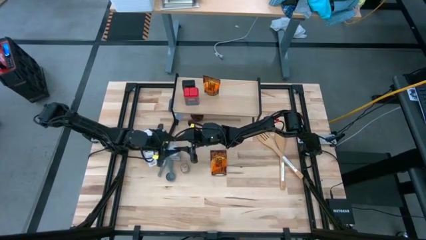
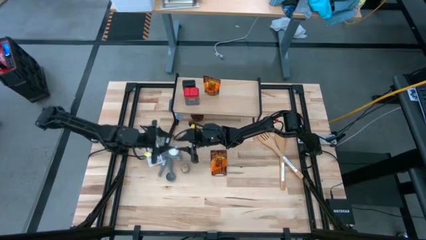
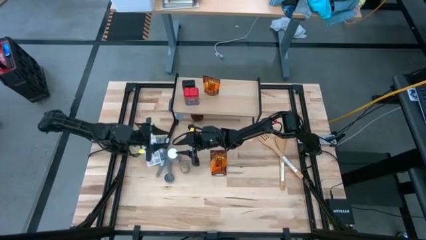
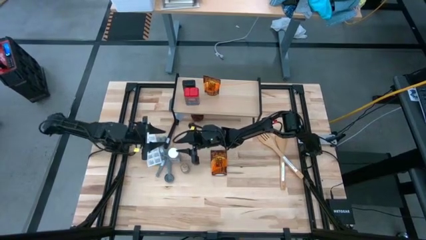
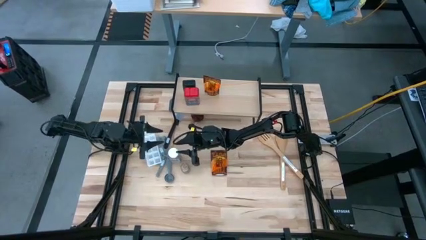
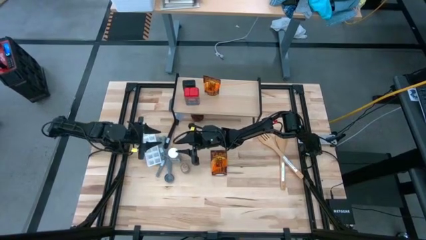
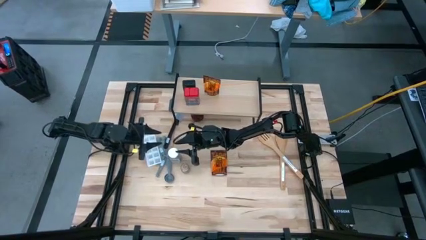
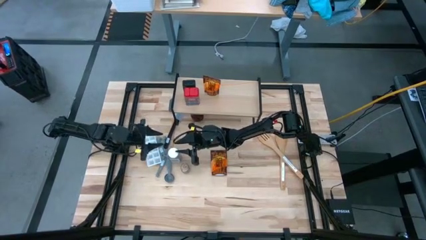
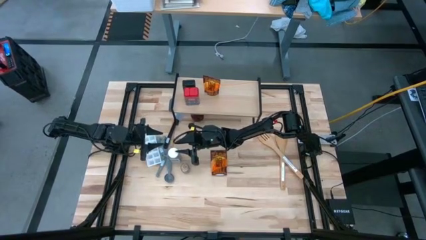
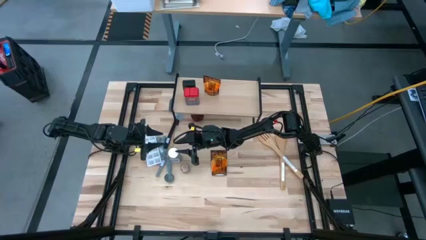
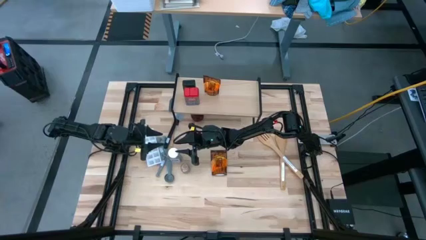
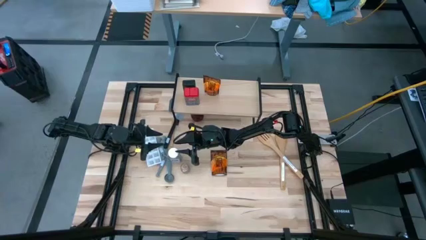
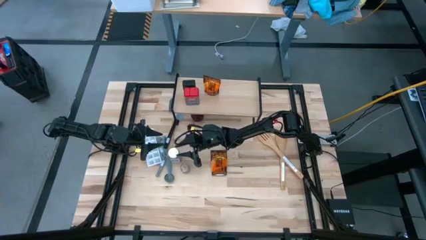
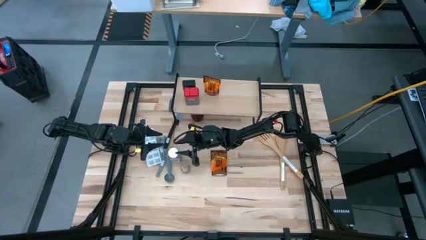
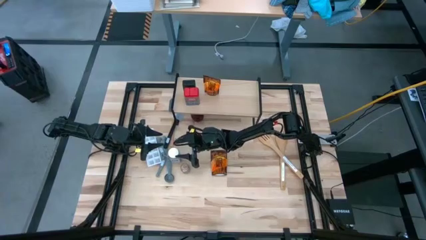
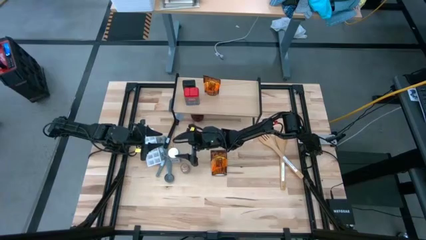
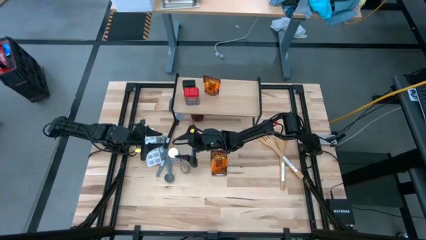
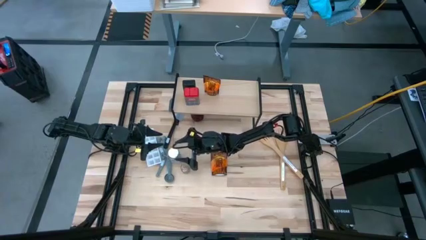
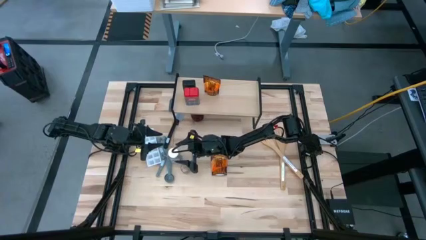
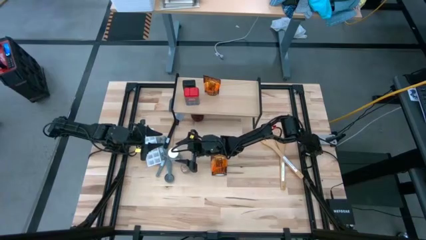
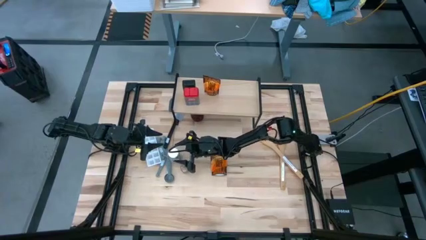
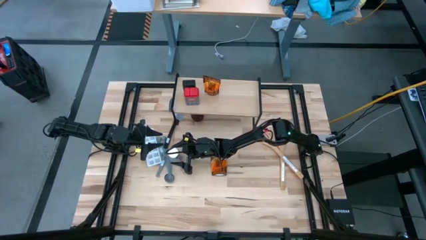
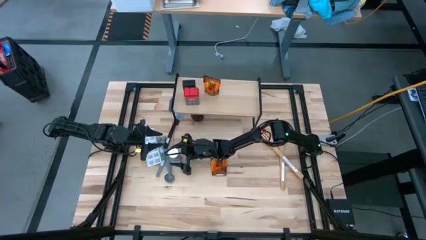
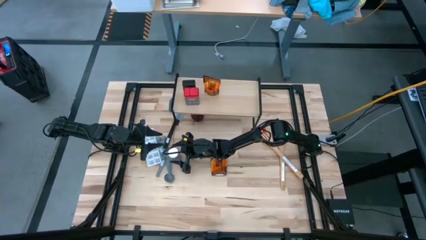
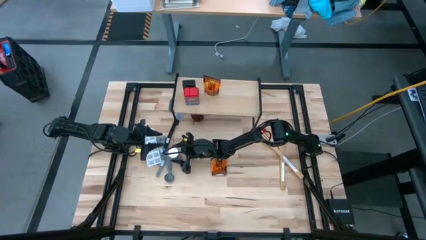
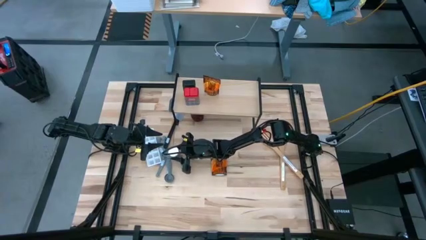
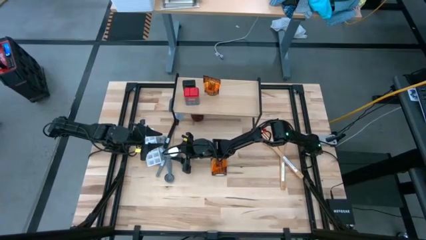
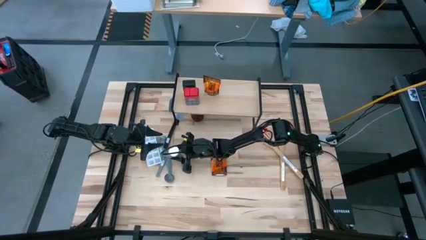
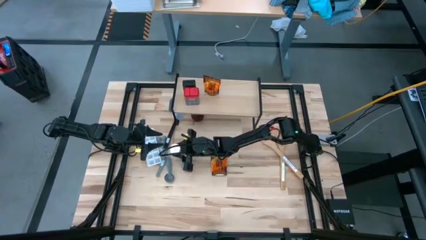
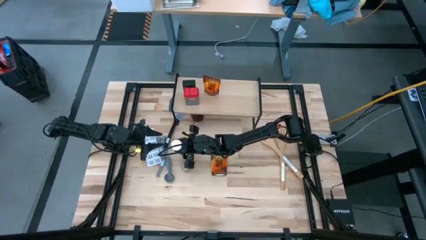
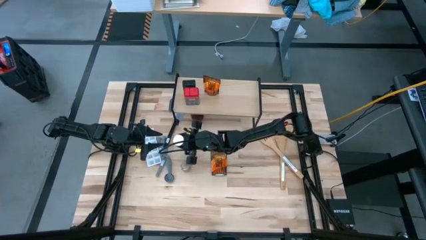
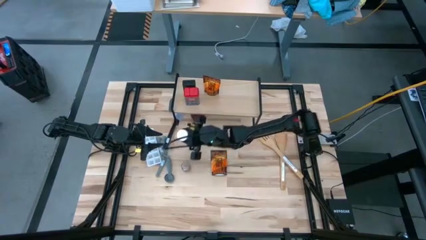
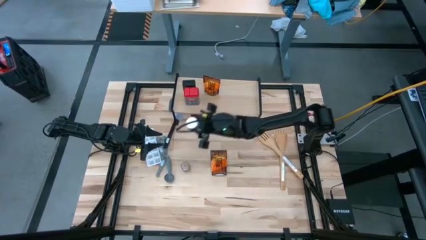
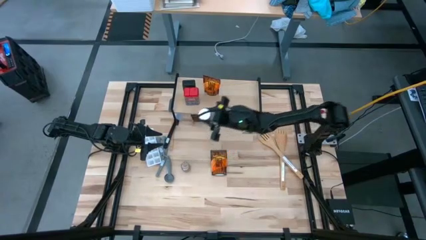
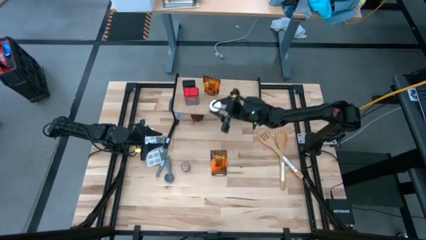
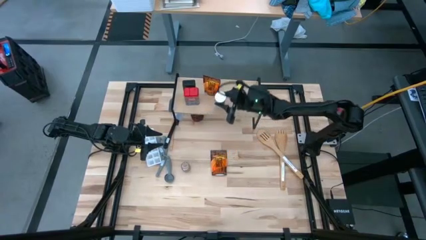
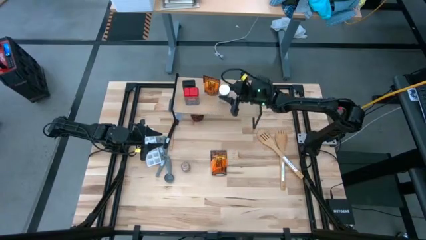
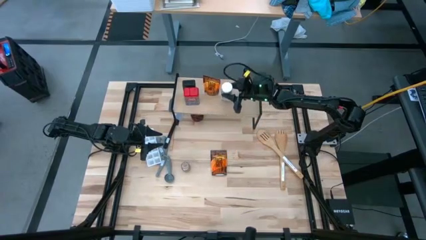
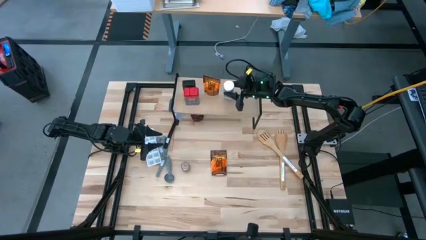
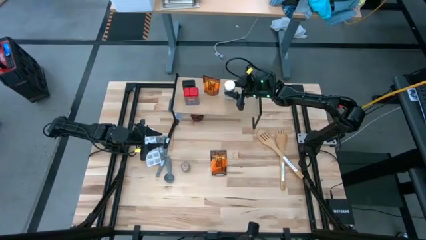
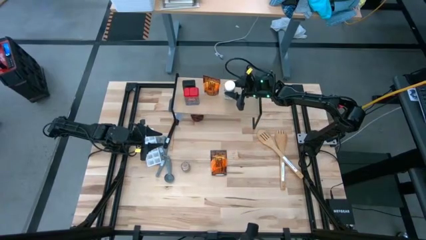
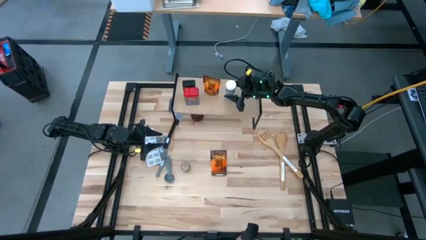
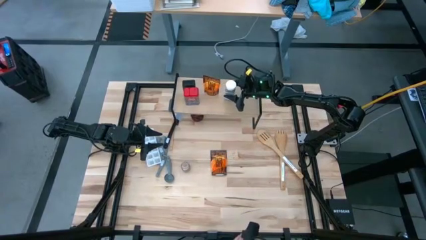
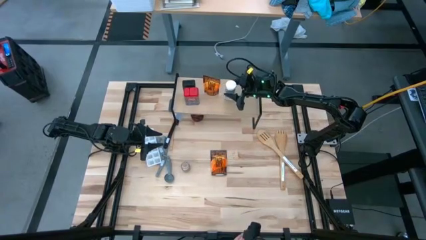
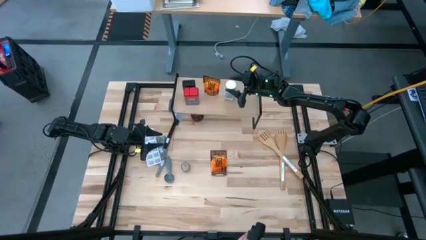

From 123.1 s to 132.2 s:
Task: Shelf spices
Put the white seasoning bottle on the shelf

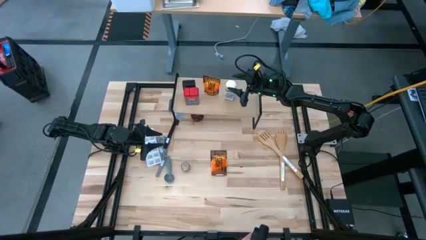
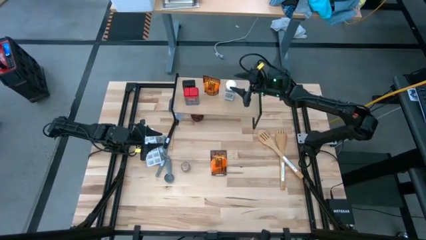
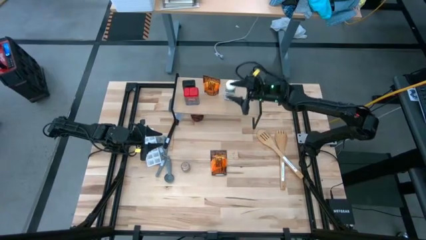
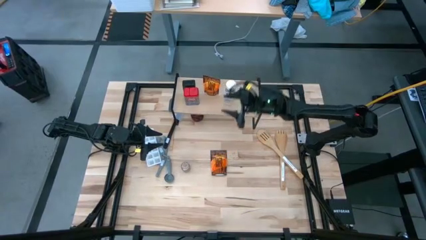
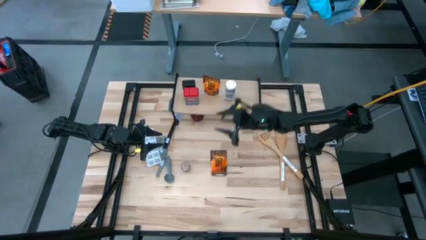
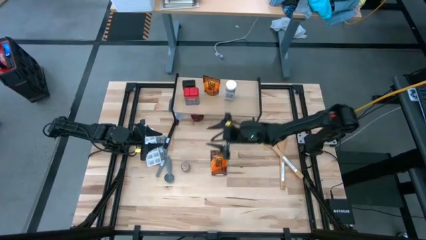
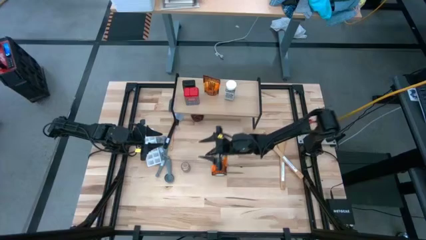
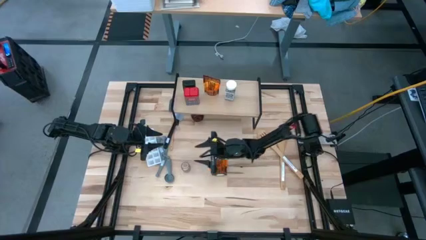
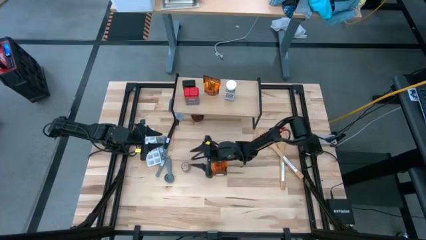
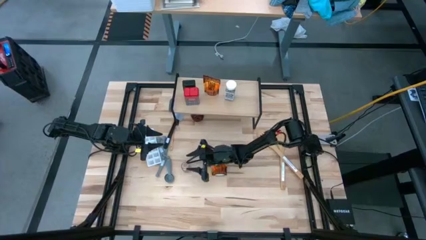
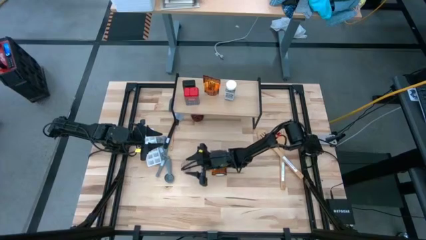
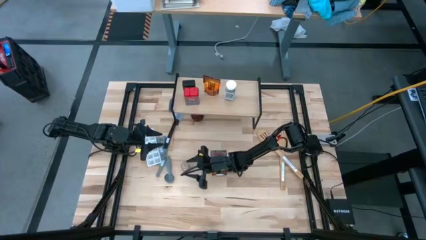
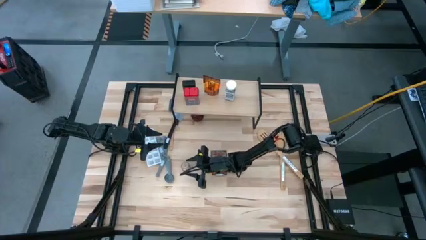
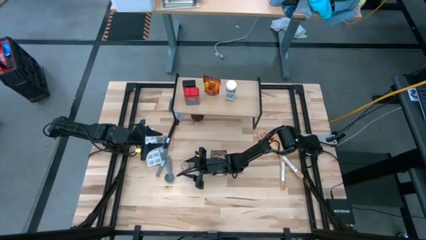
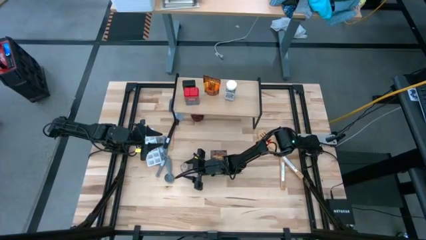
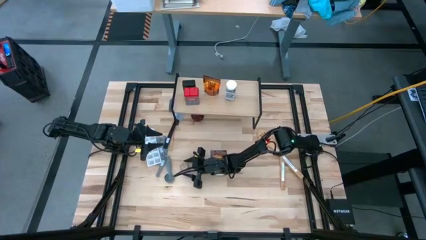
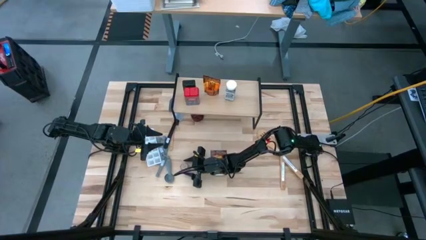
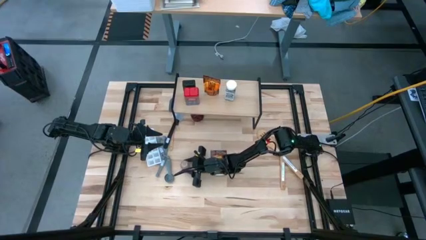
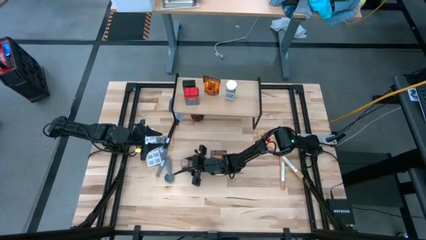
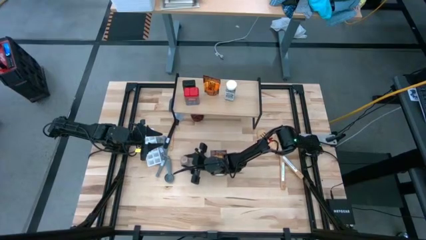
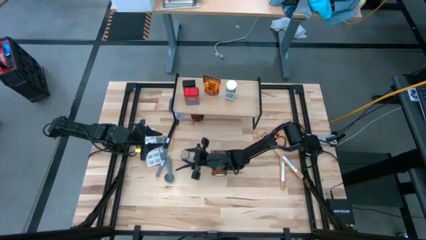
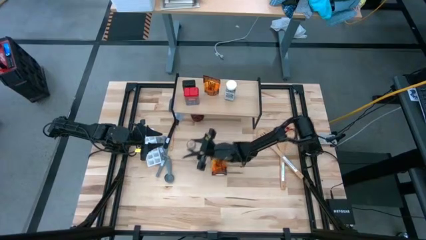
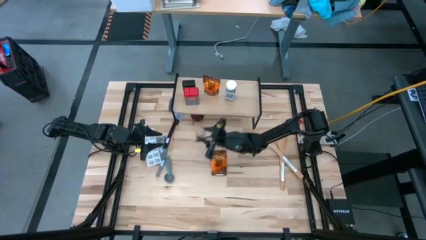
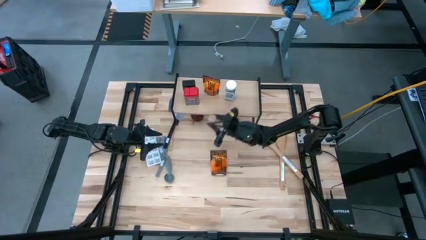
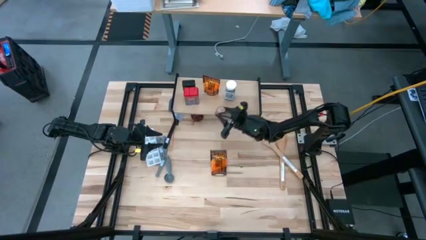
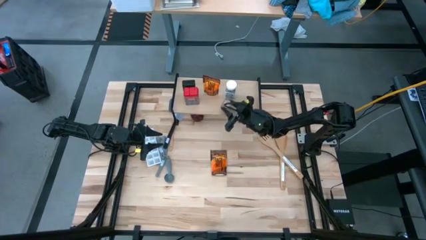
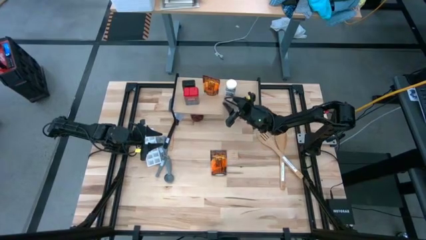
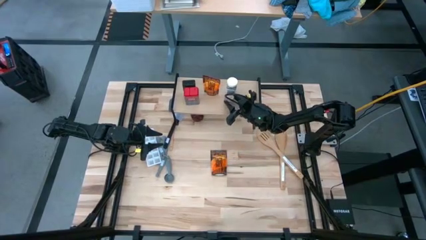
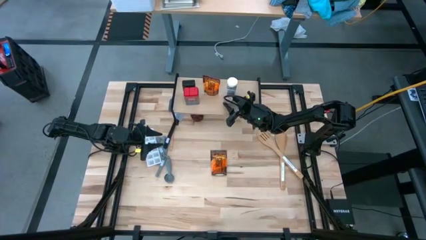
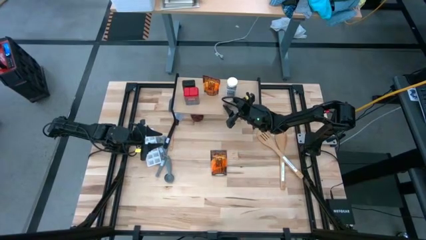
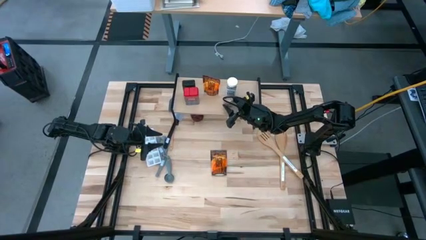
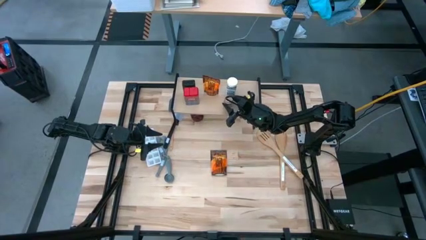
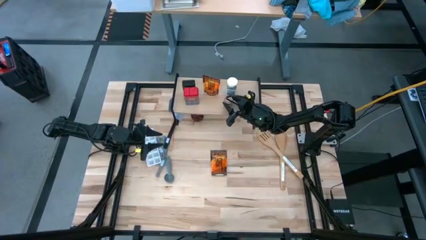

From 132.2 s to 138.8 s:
Put the transparent seasoning bottle on the shelf

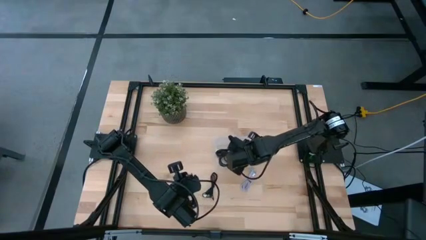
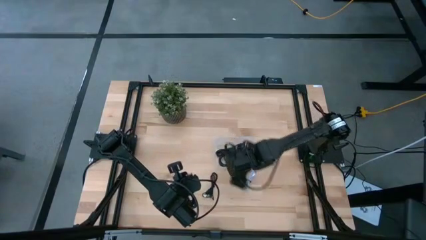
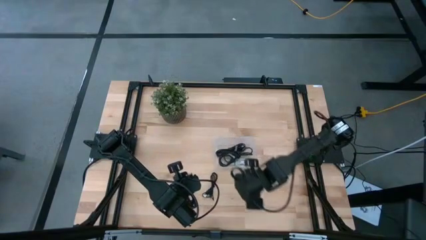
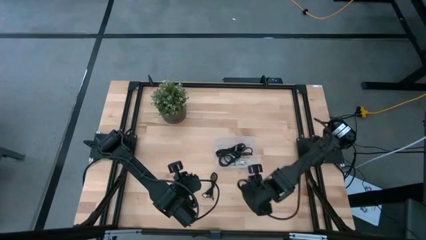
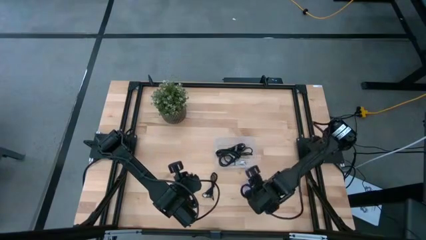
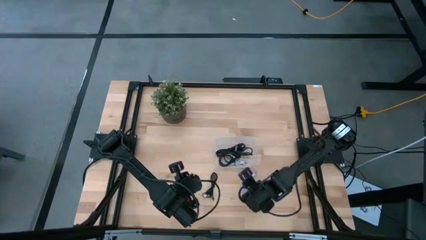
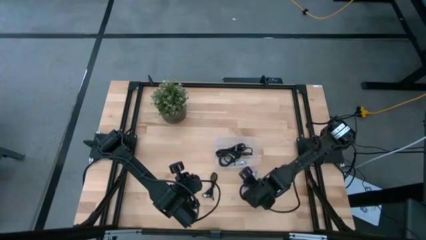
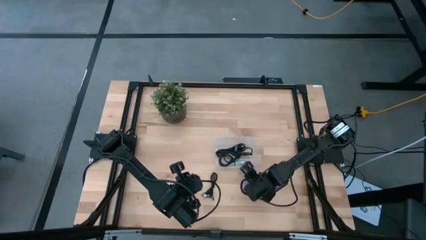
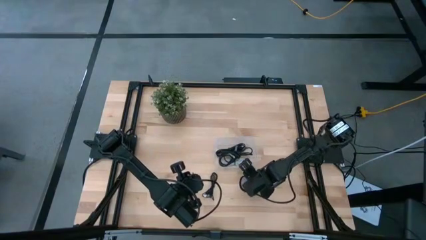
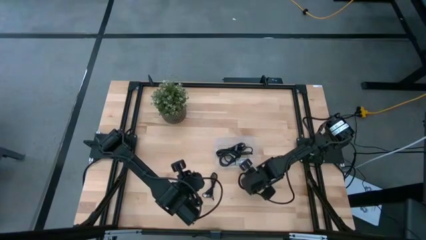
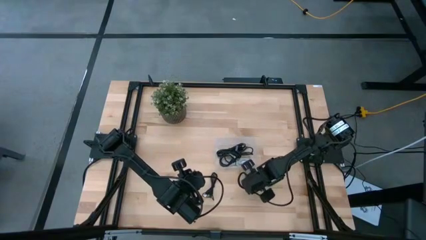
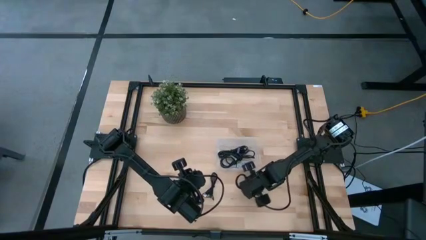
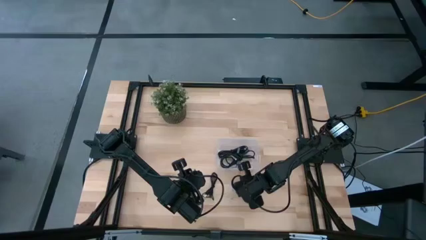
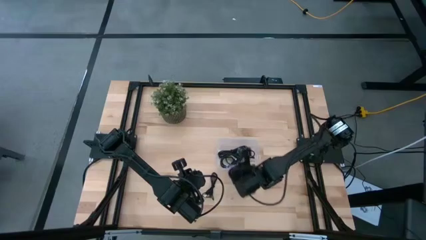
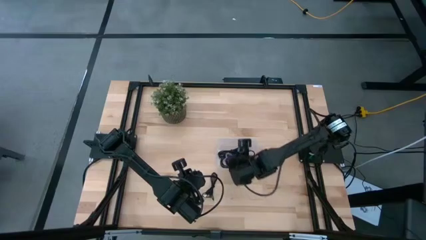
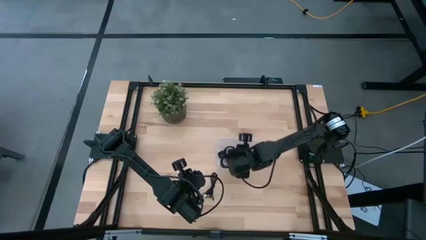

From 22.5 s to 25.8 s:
Task: Pick and place USB-C Cables
Put the white charger cable wire into the bin
